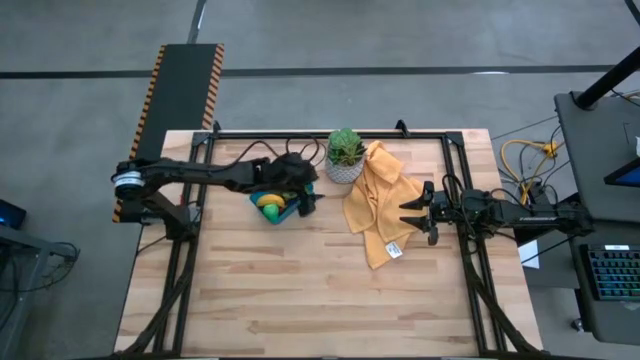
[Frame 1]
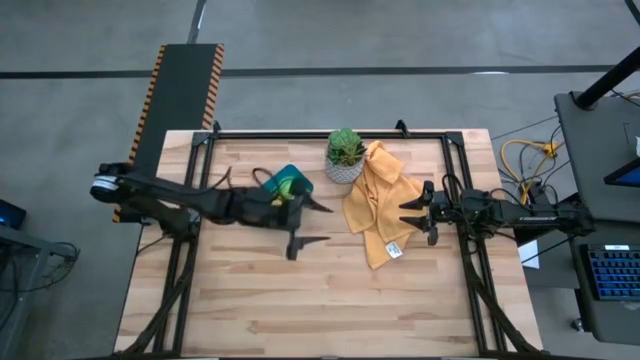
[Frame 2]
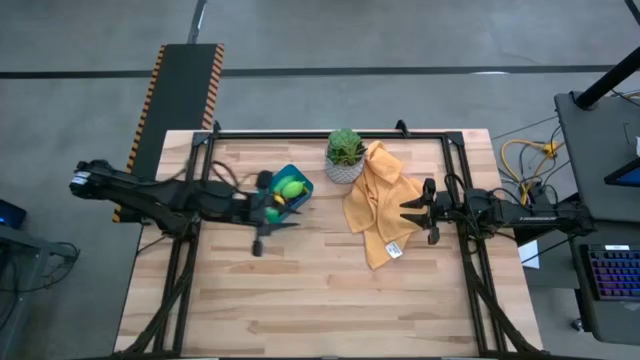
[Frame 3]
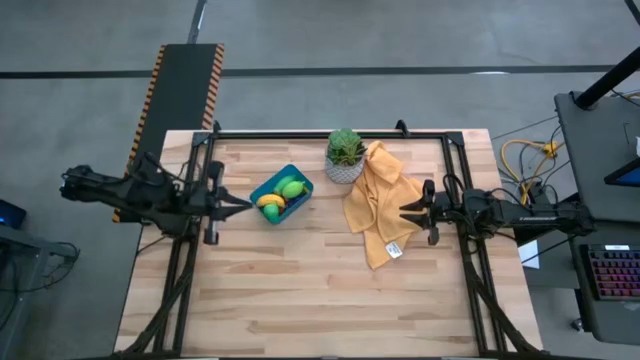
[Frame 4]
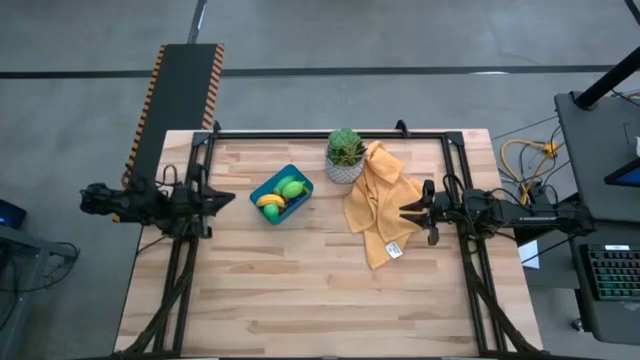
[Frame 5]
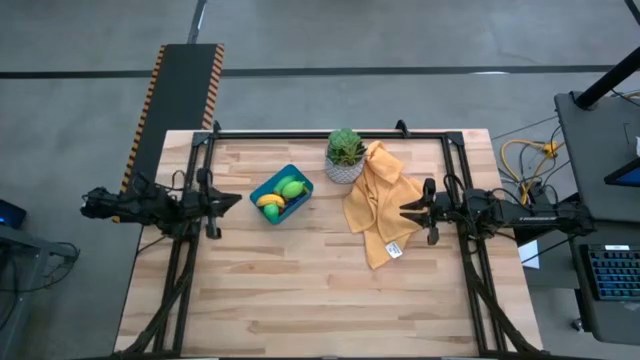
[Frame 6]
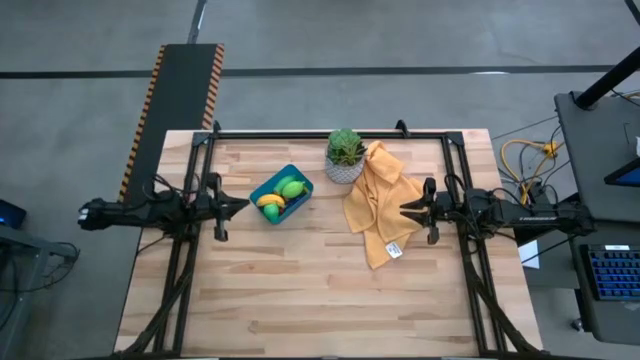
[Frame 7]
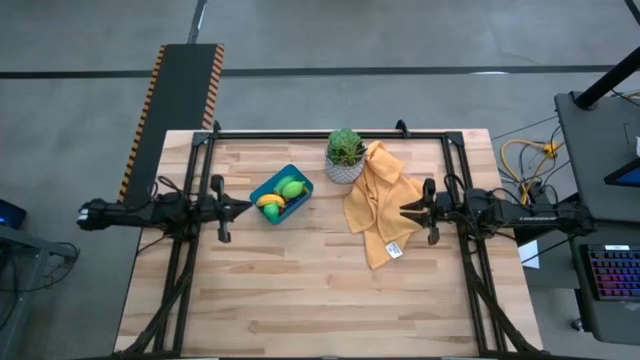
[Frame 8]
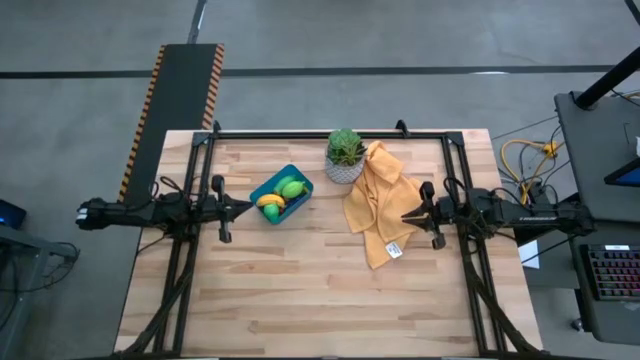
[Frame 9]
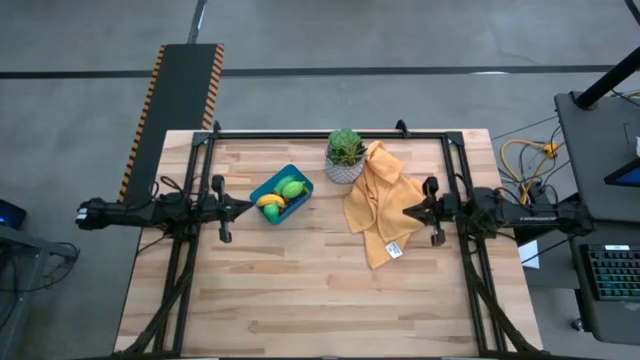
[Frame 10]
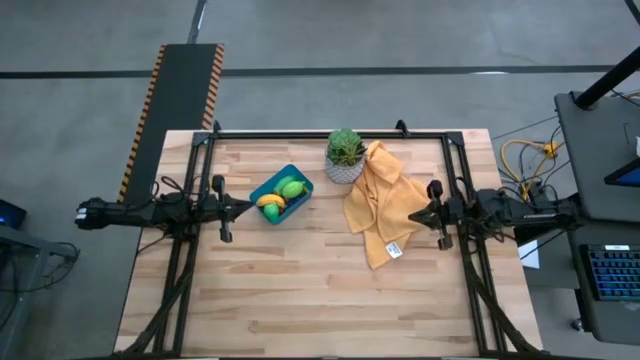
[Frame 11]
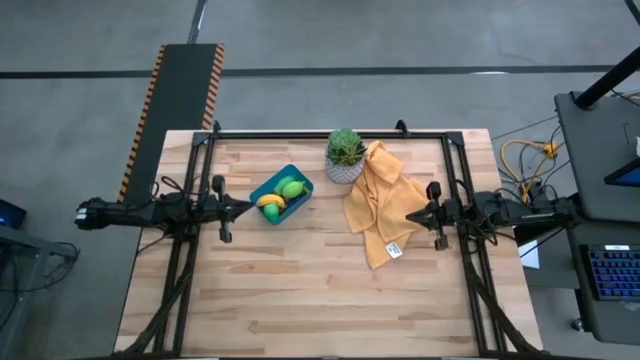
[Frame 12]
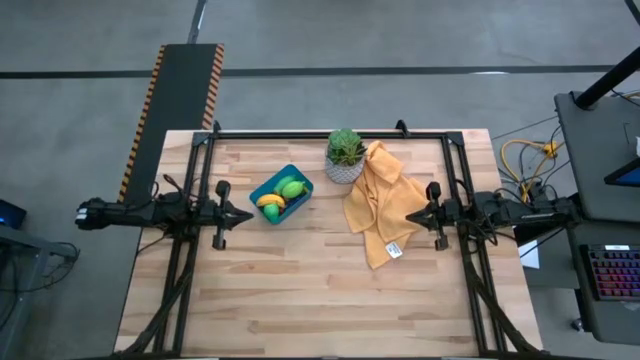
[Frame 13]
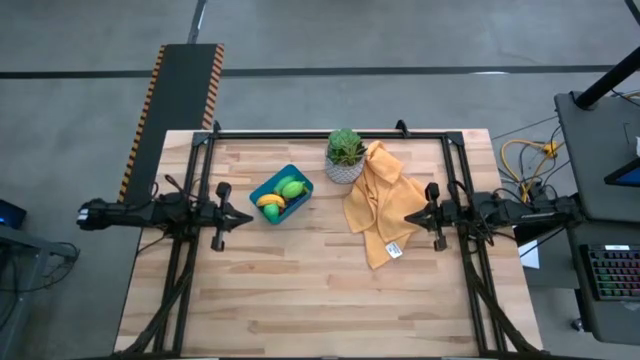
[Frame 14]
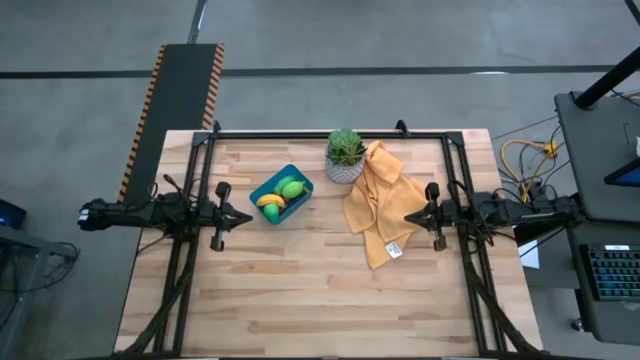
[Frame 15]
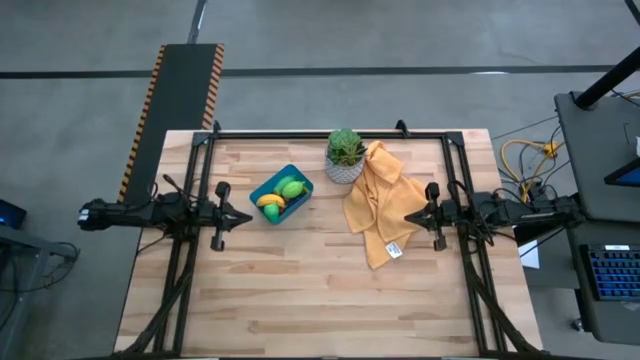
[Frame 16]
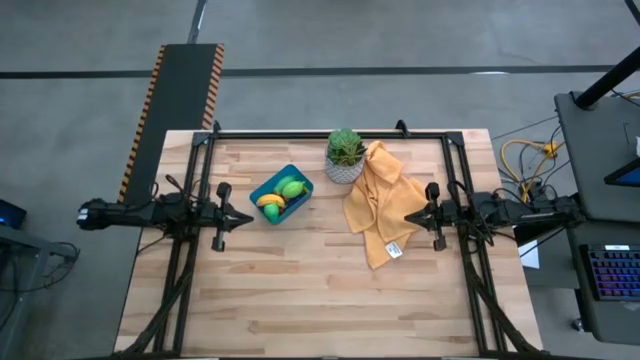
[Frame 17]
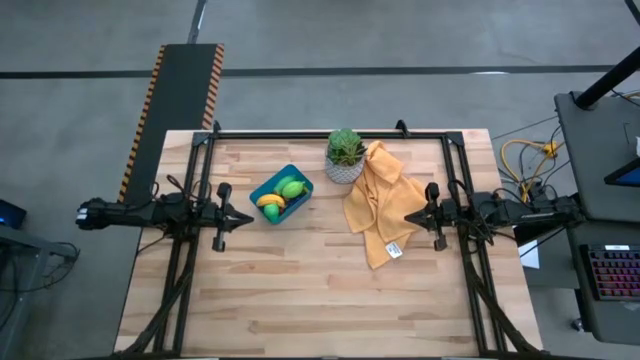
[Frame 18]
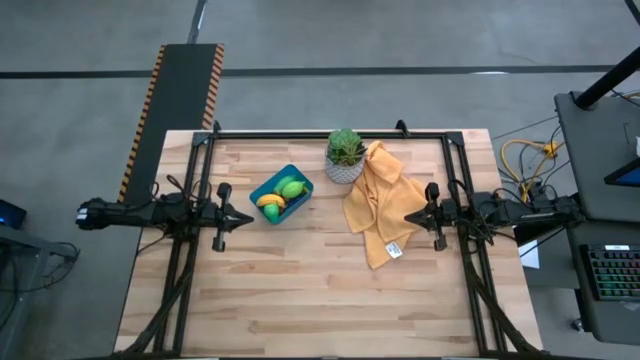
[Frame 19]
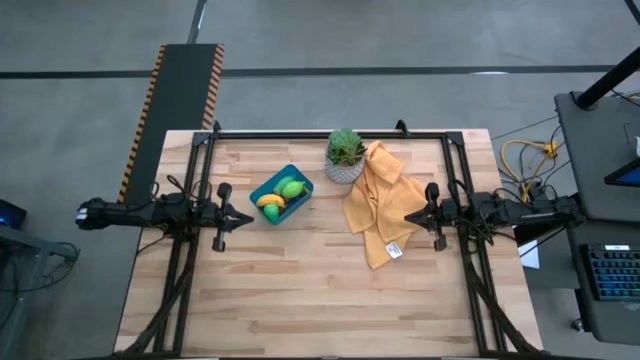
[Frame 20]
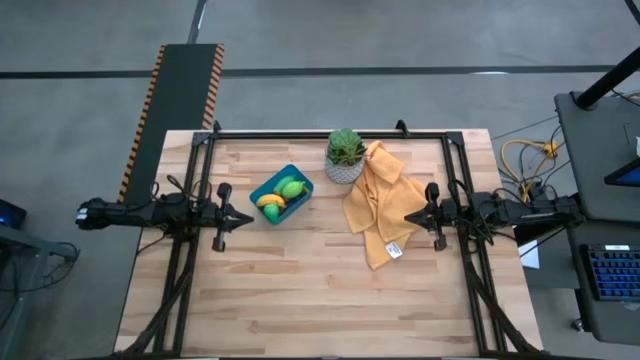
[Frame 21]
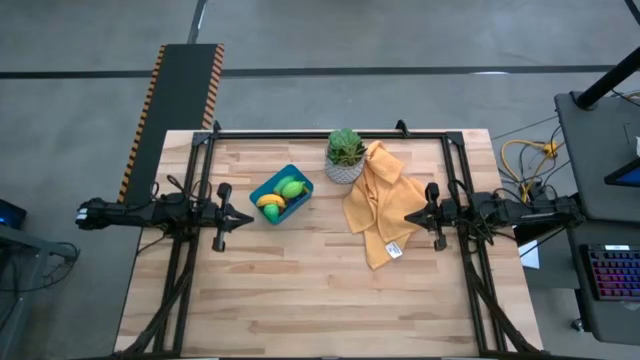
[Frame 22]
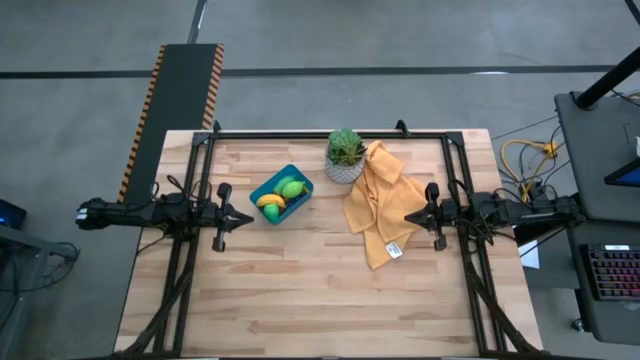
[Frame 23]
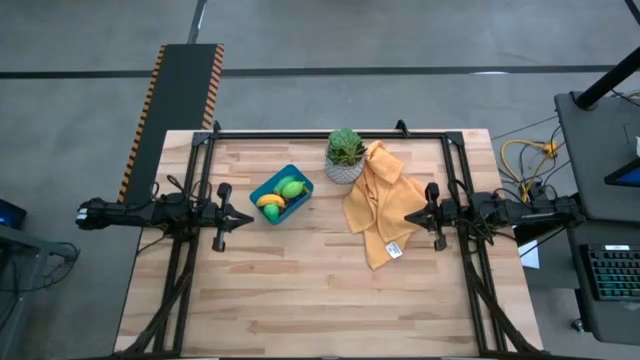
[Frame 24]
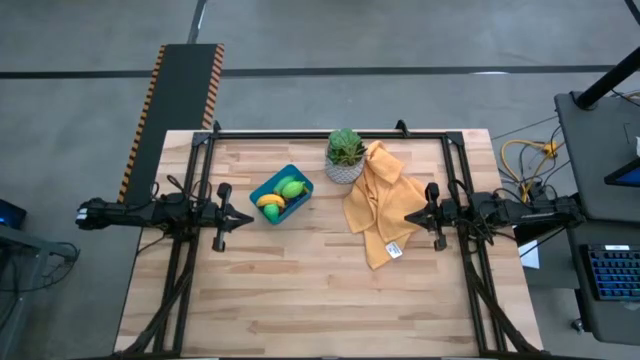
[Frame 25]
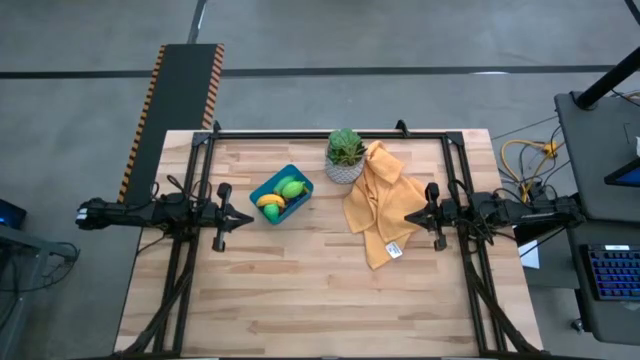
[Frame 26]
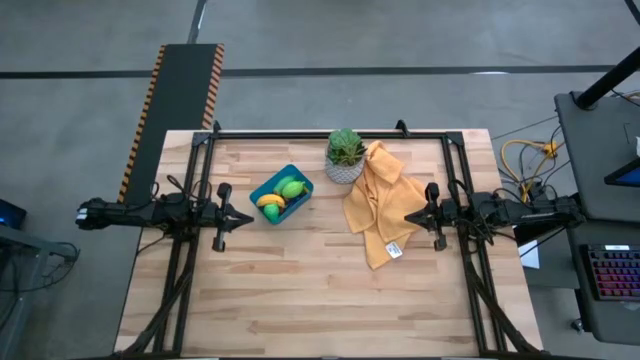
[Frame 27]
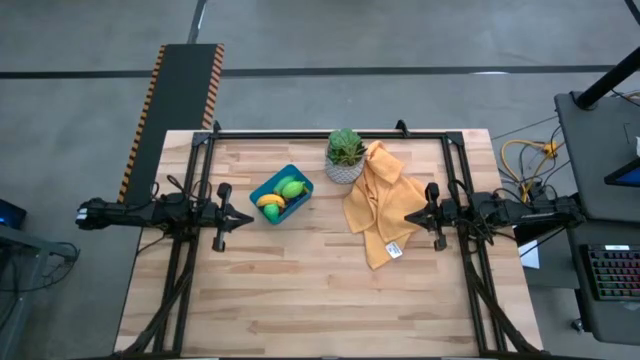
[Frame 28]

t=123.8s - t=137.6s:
Task: Pick and placing Produce into tupperware
Return to Home Position
